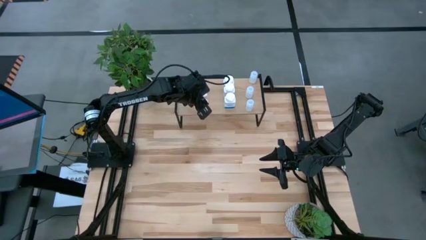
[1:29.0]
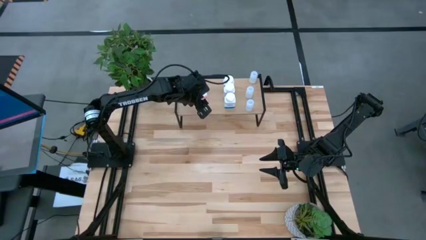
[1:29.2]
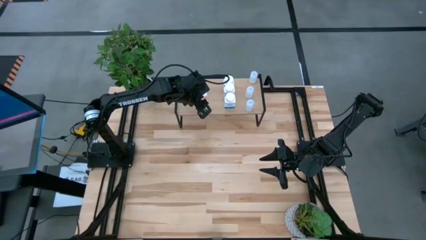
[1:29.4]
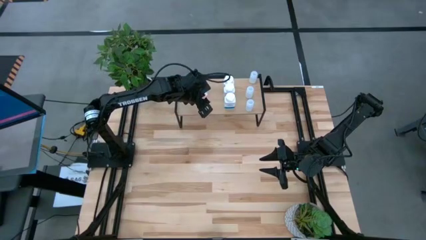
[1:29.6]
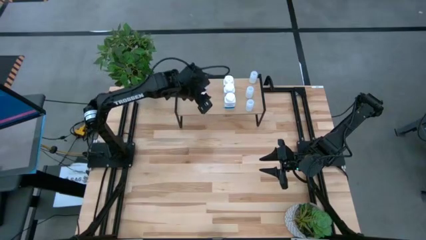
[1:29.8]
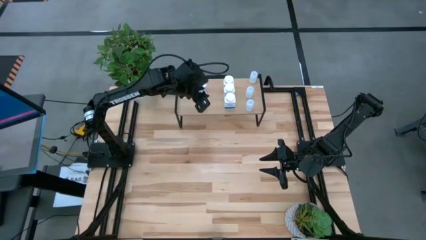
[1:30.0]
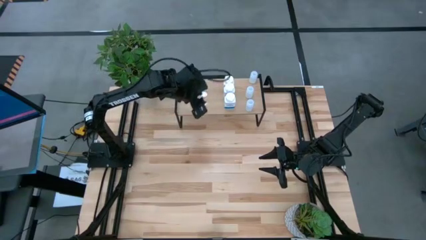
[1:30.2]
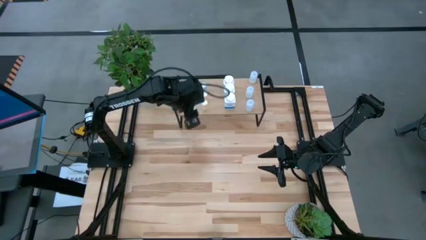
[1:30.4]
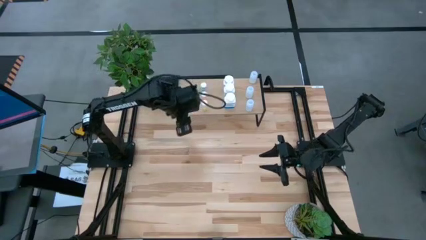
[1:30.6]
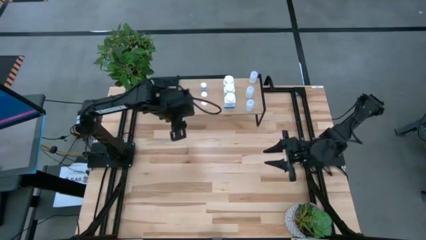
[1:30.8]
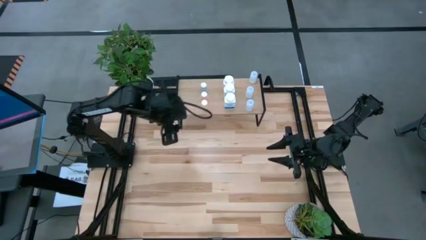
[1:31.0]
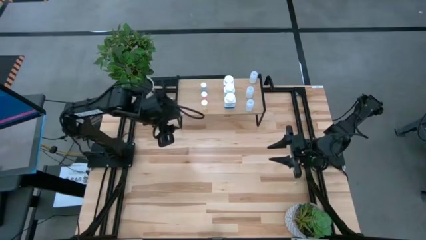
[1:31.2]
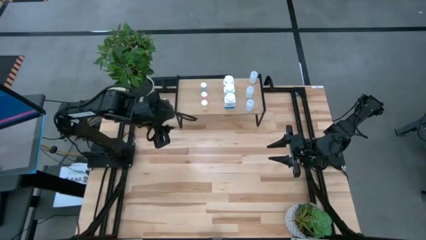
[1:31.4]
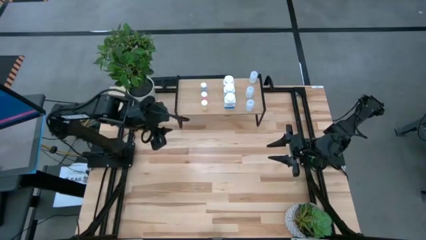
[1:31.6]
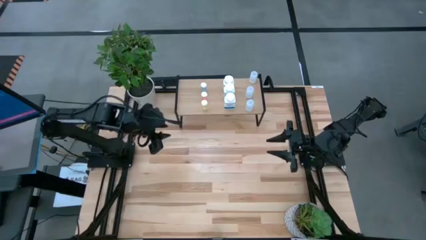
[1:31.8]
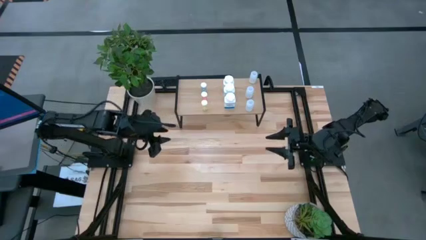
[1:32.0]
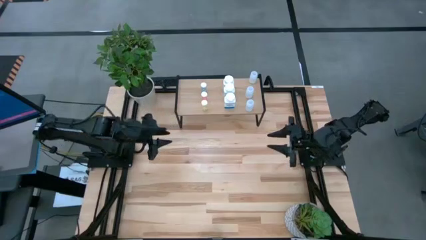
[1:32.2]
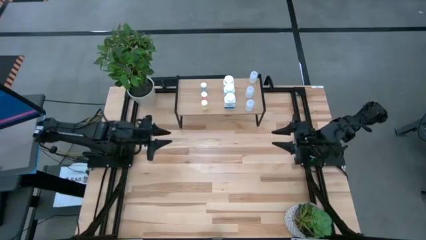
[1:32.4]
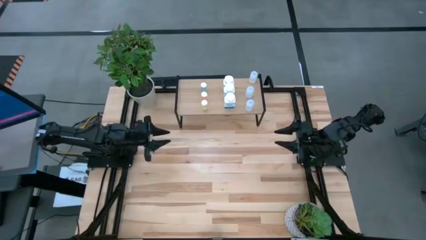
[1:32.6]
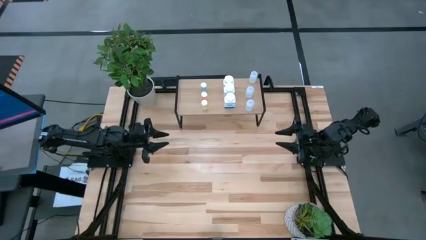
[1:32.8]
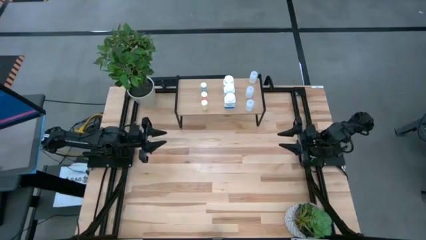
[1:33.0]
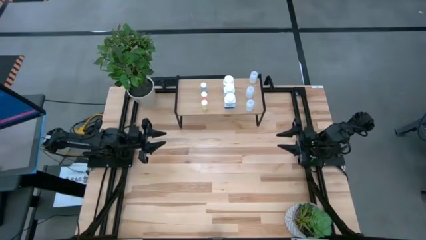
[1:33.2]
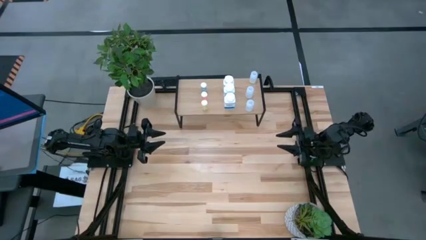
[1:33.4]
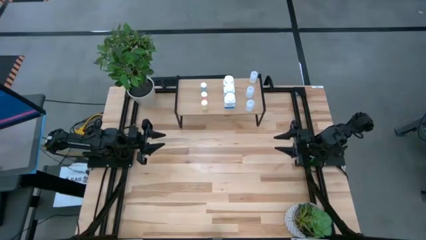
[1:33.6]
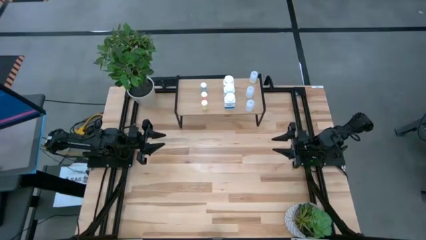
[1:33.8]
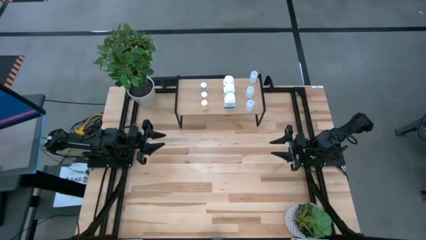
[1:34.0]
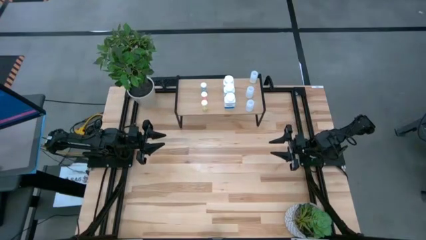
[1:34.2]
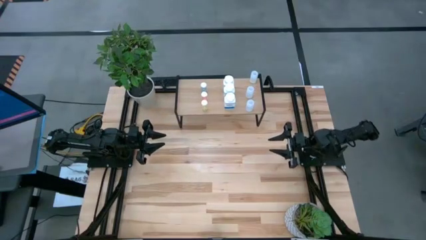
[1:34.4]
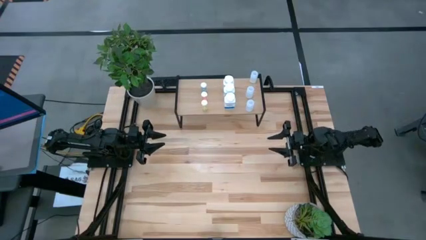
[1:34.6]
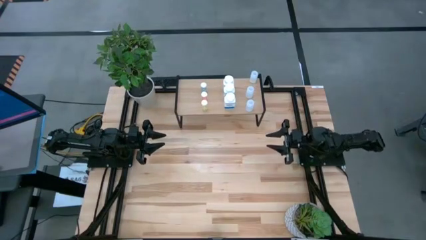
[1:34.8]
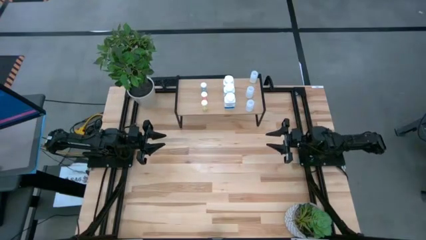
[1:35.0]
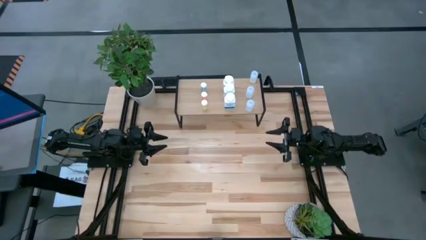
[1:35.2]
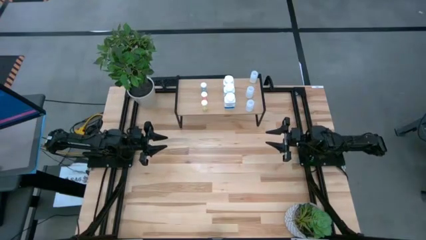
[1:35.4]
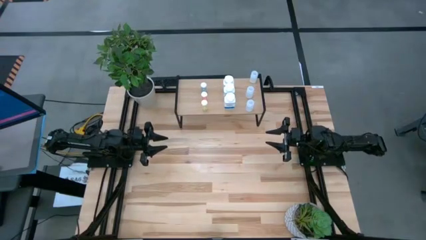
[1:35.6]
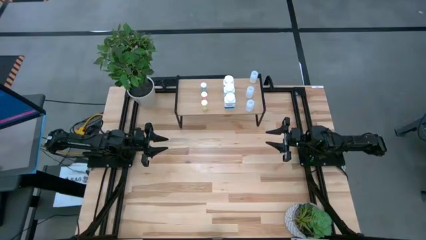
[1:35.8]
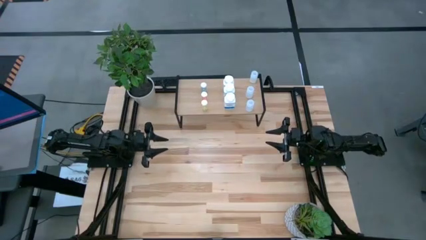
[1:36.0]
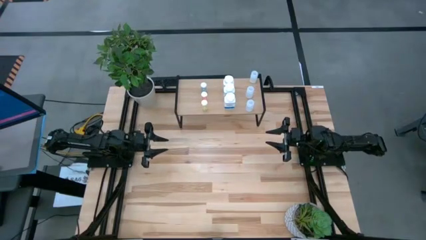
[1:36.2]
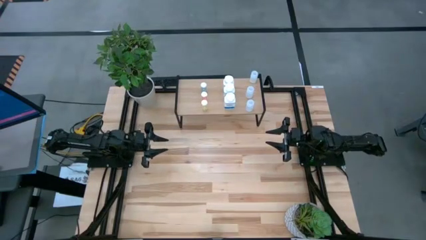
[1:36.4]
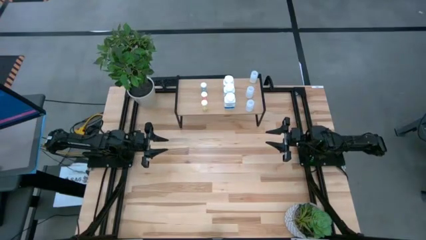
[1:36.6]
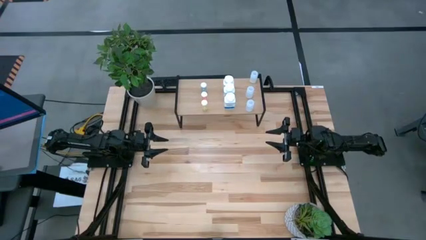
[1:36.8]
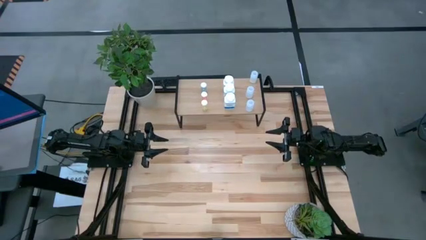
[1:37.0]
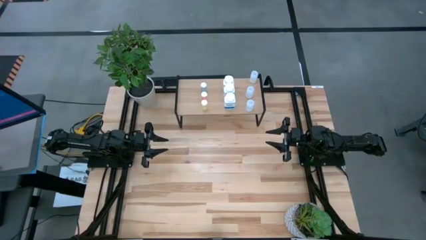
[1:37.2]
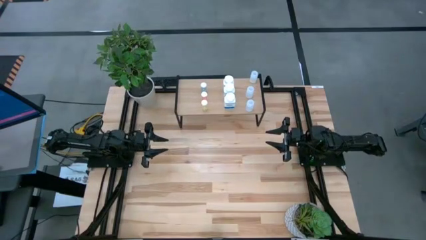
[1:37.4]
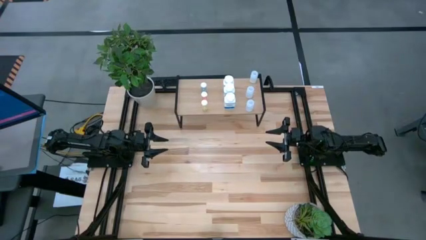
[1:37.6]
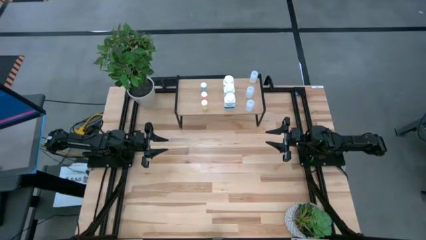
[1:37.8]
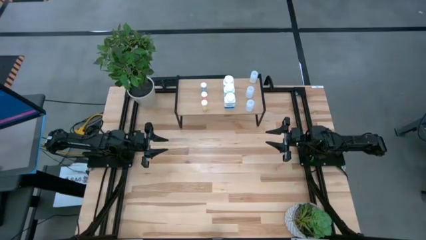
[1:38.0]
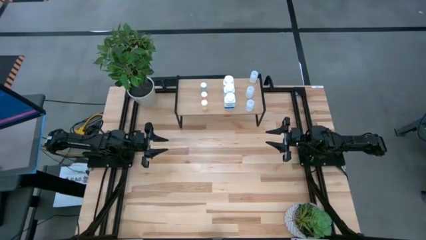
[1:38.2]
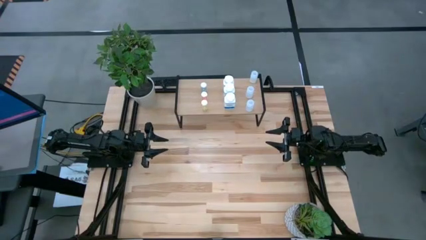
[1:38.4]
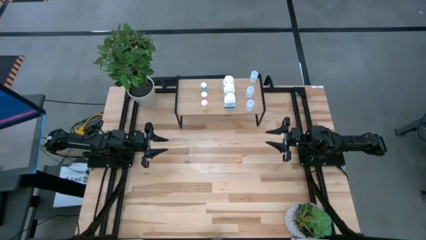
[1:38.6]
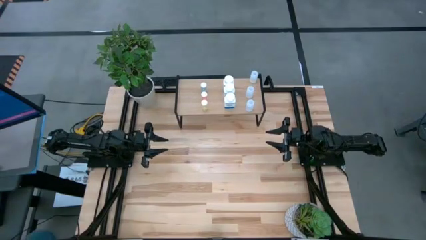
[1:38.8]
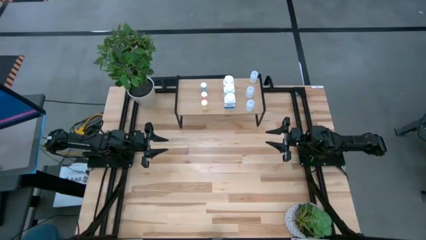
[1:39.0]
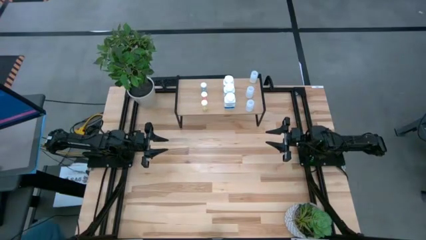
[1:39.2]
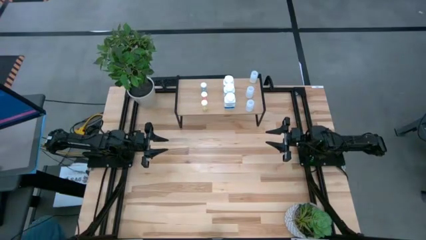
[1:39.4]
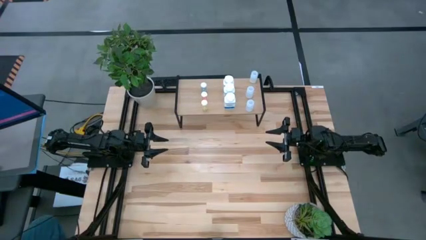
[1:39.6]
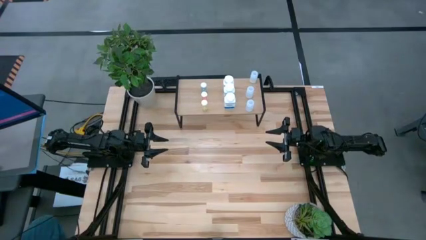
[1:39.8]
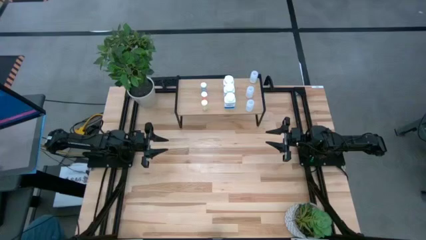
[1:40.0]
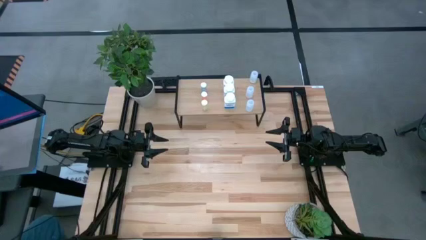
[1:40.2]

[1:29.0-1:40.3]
Task: Pick and place medicine bottles onto shelf by color
Return to Home Position

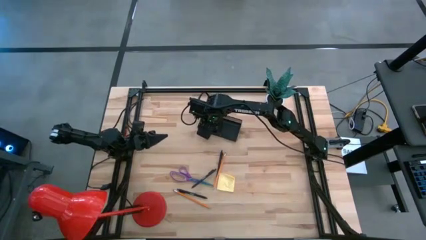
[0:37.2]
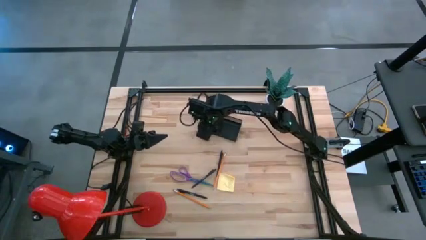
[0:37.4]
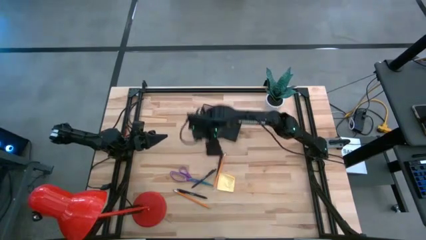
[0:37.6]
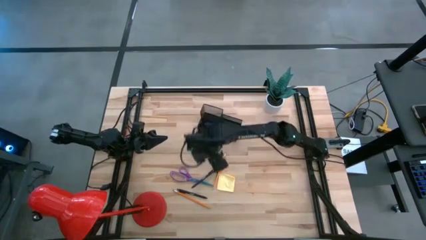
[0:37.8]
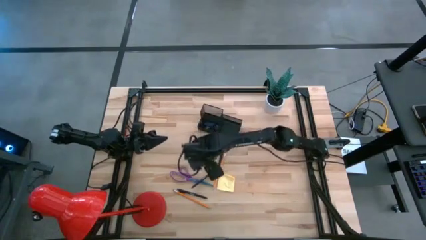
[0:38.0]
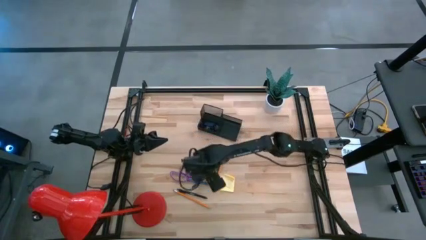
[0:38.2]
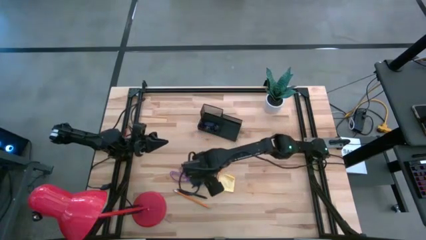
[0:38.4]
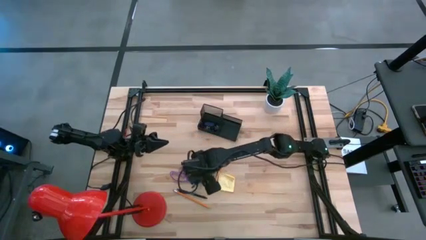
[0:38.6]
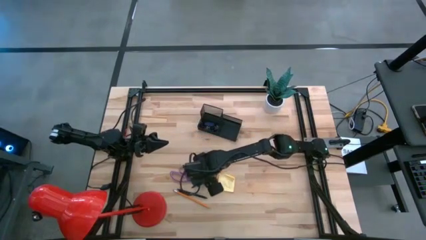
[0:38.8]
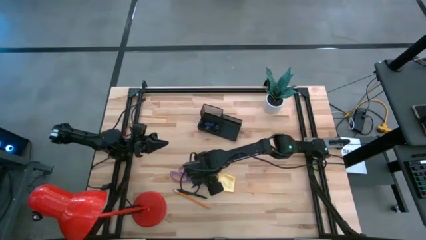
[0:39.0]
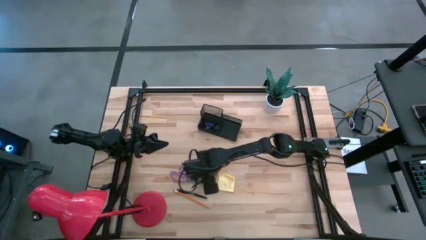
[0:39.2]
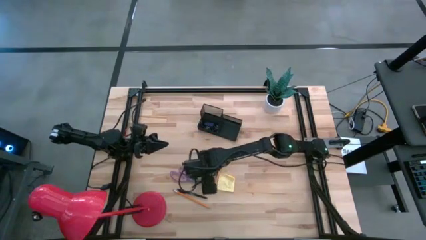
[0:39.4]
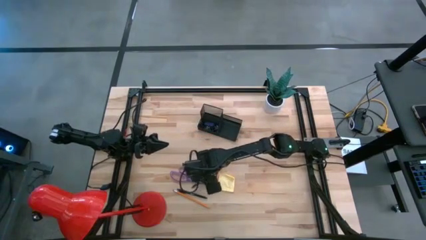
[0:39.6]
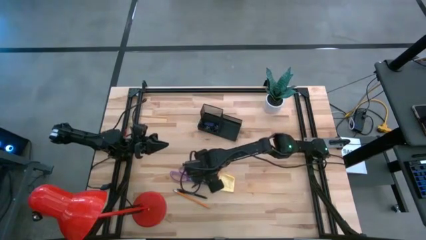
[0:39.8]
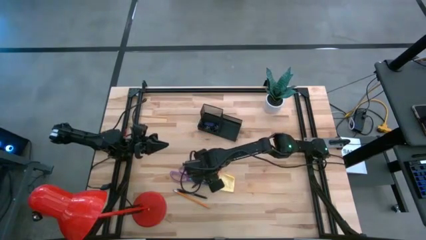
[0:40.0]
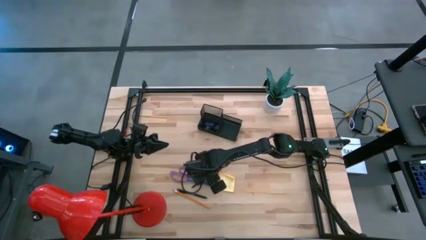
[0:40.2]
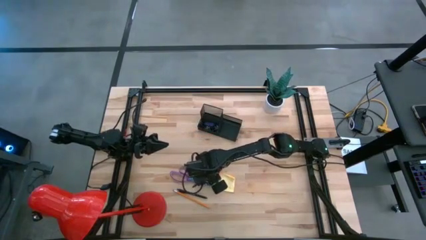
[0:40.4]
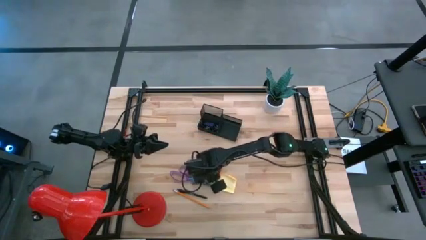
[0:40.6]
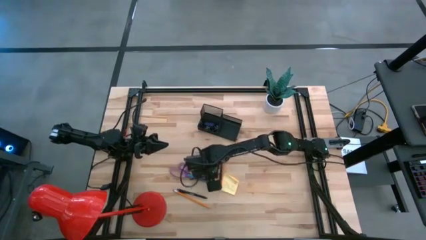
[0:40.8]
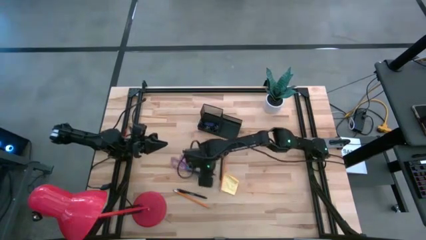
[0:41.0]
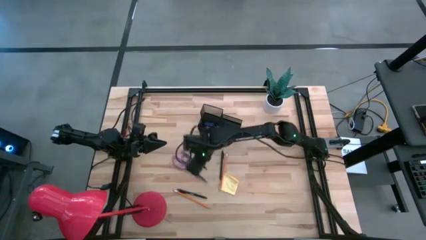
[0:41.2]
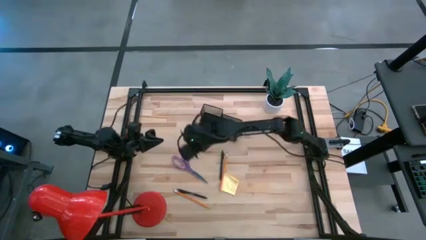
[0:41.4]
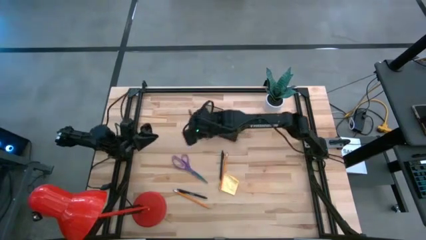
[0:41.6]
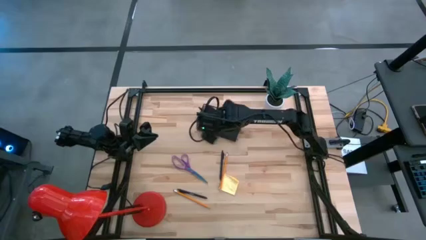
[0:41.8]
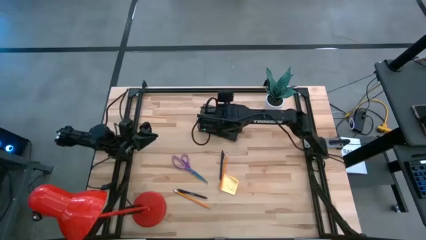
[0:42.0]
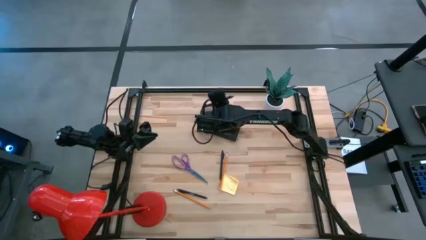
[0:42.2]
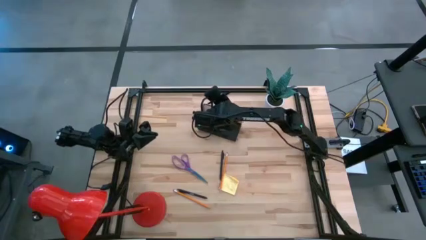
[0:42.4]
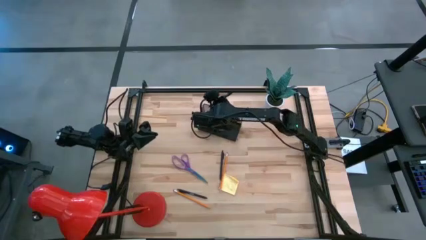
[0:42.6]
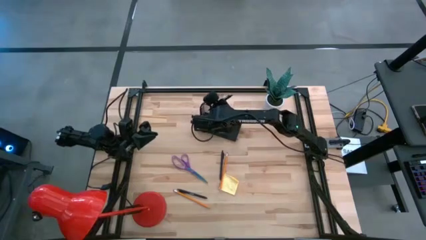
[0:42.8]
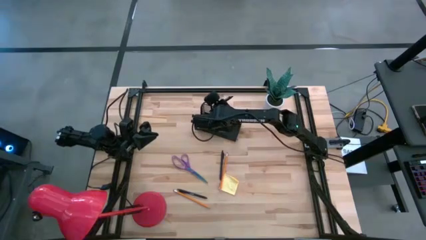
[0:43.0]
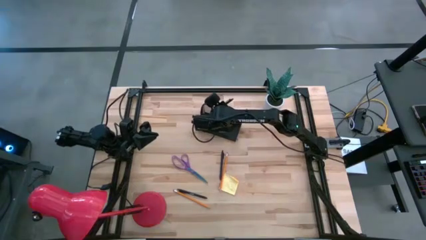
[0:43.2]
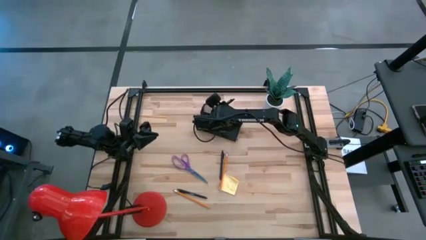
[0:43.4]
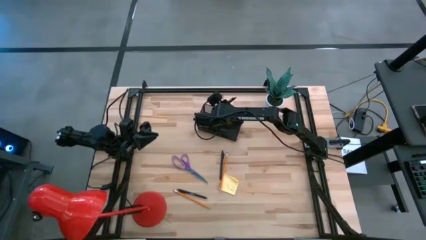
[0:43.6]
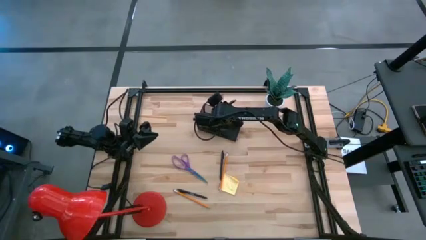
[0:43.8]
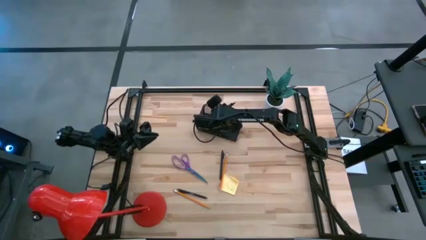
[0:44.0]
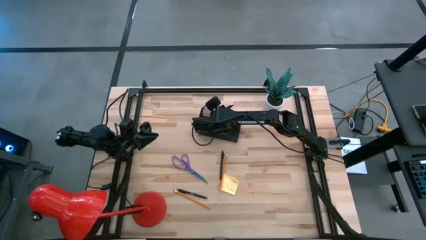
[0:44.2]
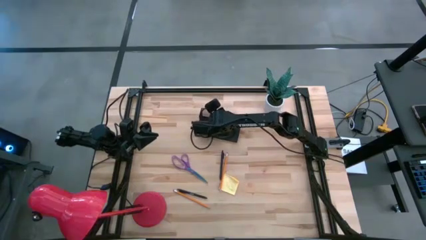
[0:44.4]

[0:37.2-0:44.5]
Task: Pick and place office supplies into organizer
Put the center black pen into the desk organizer
